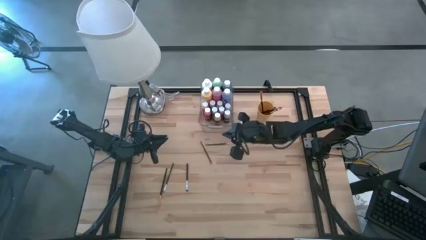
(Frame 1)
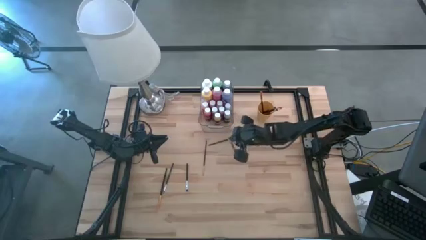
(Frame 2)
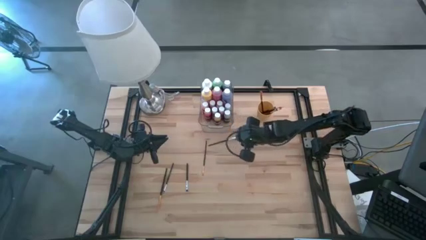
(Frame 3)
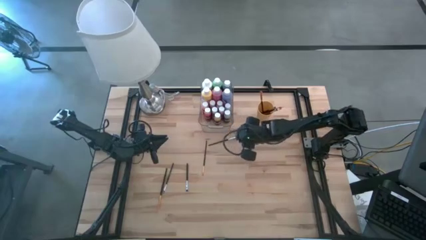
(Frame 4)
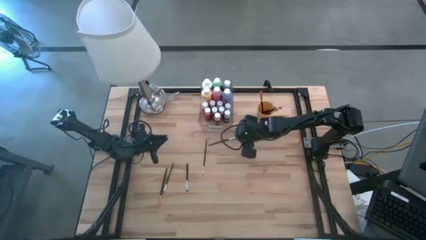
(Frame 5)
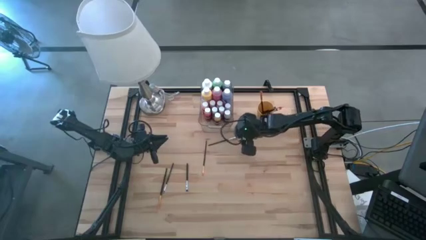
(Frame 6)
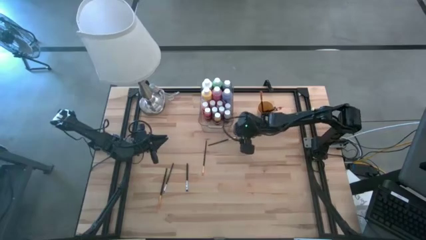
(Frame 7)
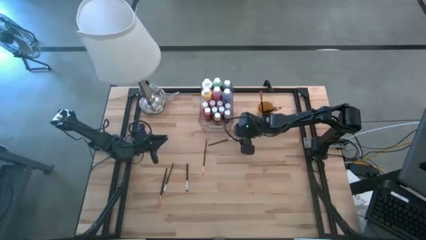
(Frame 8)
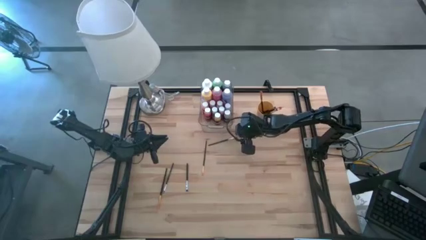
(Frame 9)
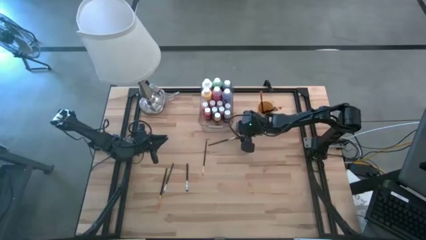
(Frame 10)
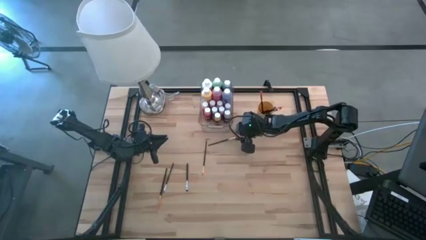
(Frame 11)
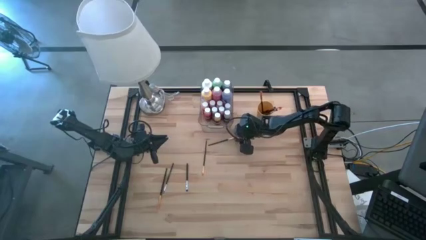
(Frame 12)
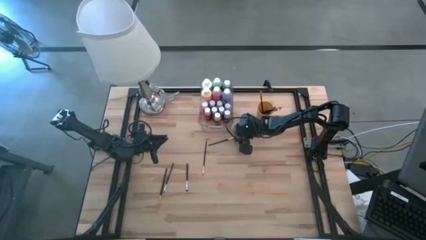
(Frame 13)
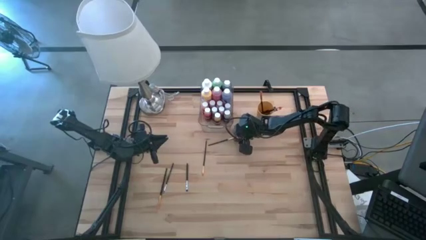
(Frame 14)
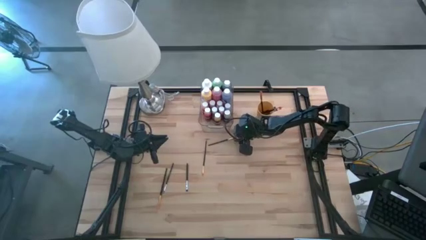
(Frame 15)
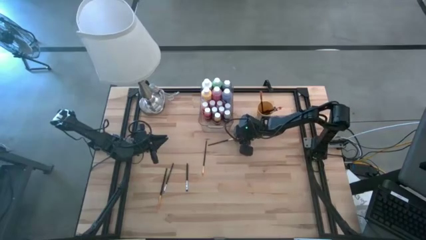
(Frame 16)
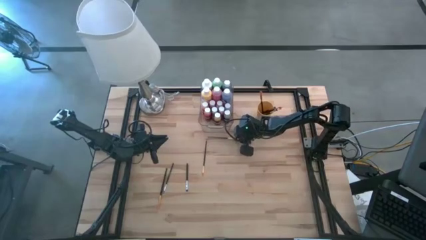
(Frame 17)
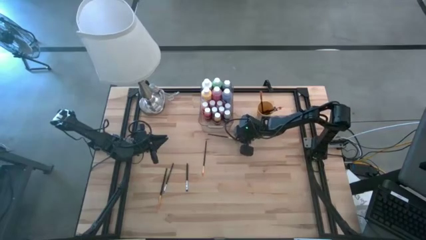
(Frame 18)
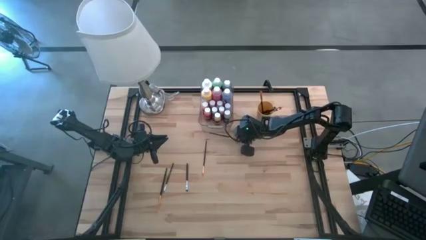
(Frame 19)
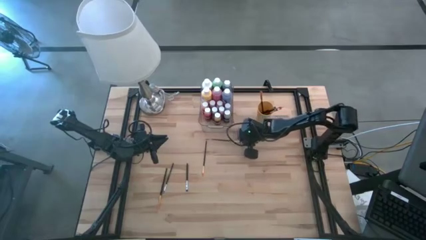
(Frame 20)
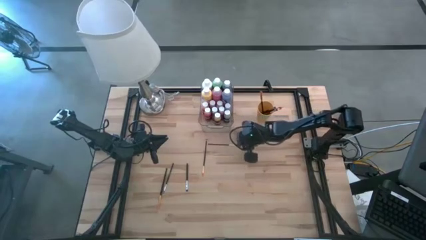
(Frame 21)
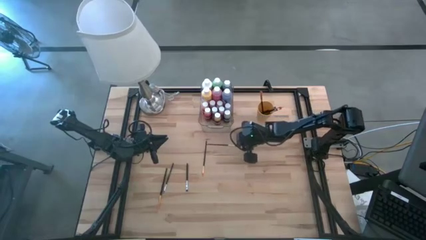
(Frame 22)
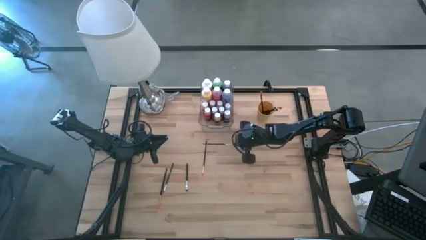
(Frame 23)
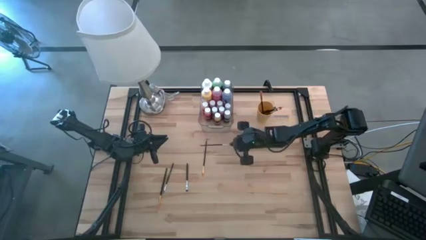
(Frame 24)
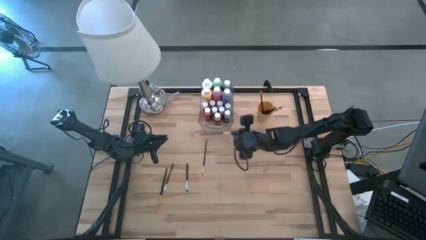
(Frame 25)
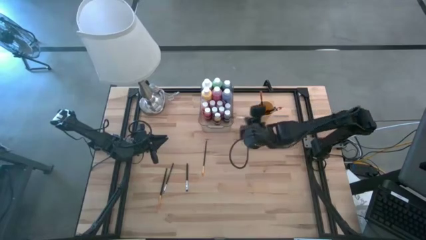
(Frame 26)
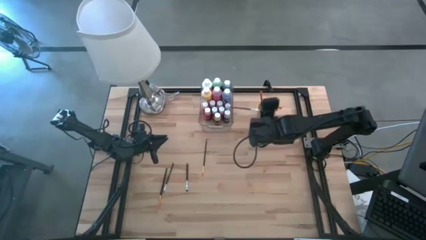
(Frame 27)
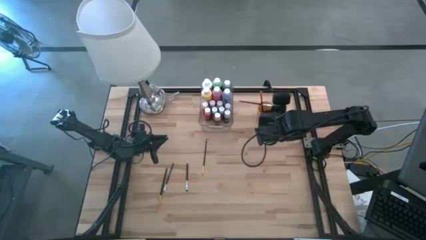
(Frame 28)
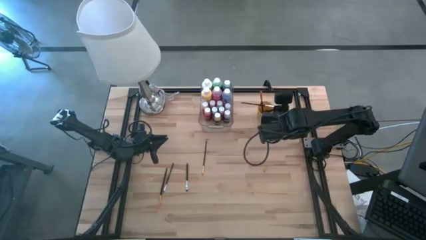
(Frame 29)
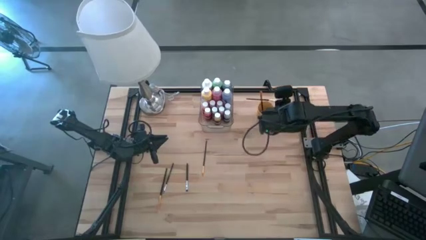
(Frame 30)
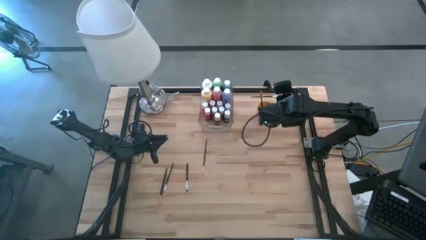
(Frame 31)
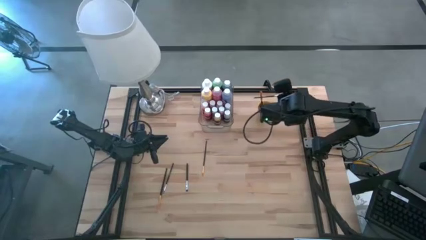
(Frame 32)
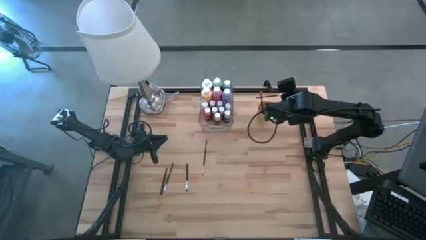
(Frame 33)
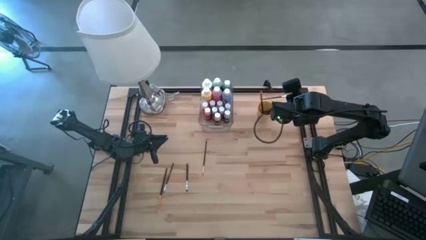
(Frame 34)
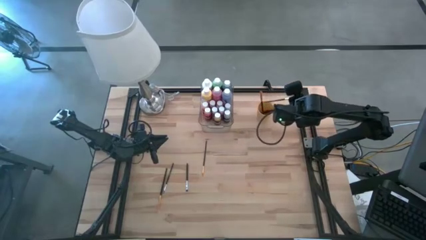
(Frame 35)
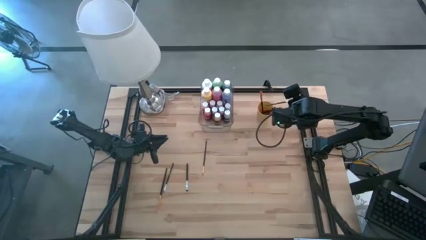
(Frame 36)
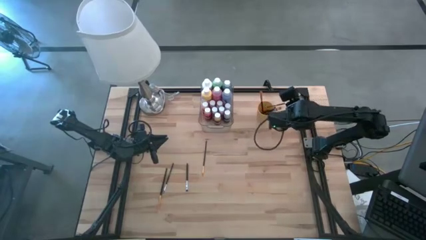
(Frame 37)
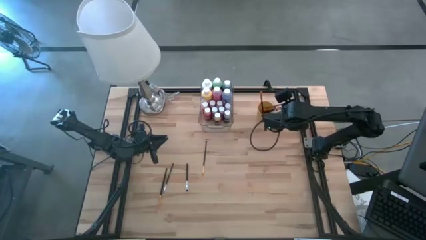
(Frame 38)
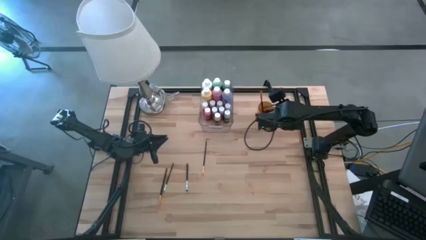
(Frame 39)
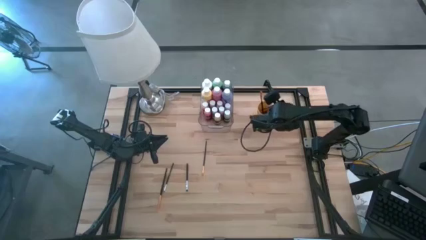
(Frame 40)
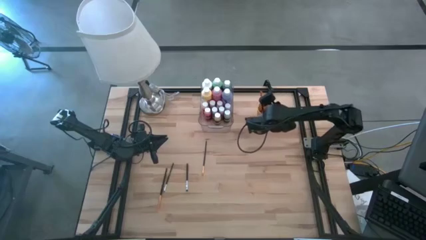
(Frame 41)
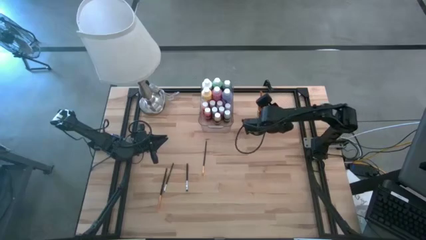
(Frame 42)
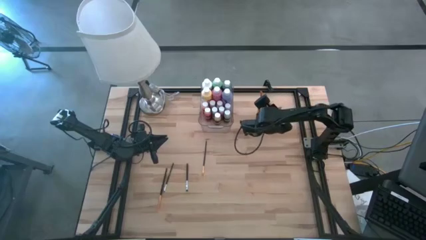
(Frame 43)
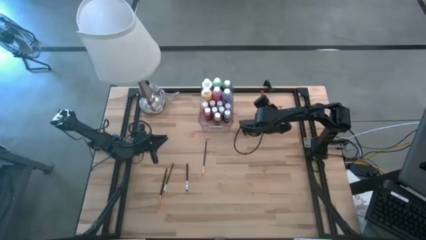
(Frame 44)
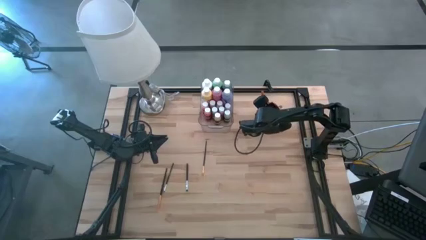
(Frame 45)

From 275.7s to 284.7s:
Task: Pick & Place Paint Supplies
Put the silver paint brush into the cup

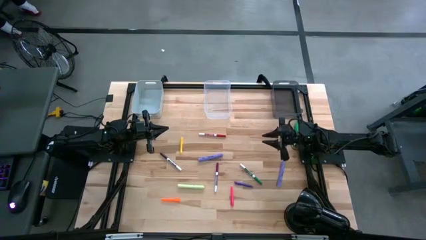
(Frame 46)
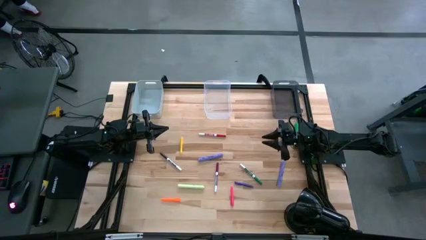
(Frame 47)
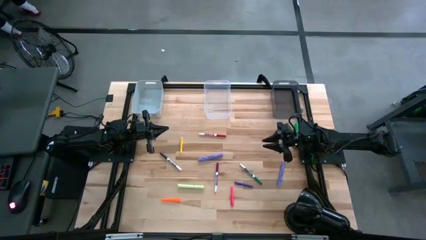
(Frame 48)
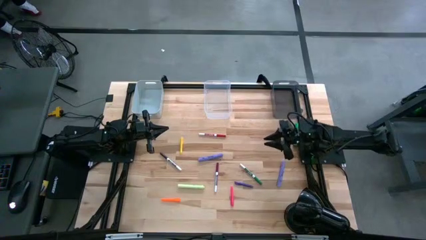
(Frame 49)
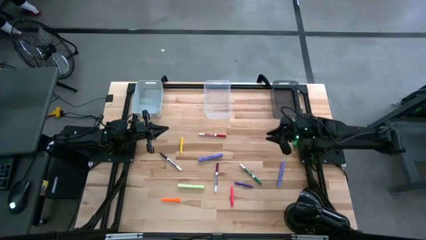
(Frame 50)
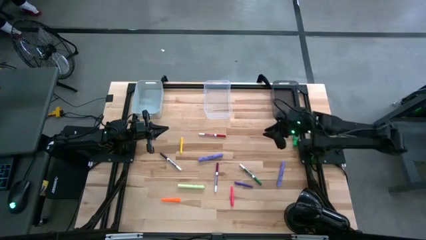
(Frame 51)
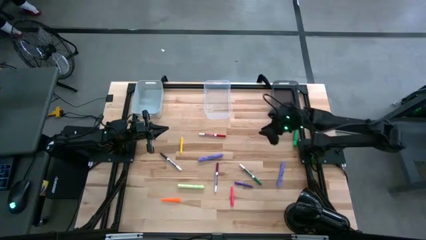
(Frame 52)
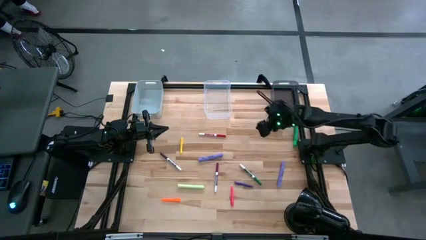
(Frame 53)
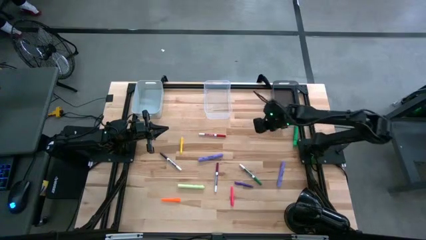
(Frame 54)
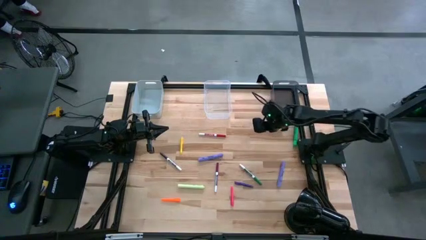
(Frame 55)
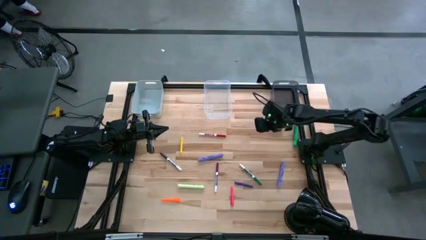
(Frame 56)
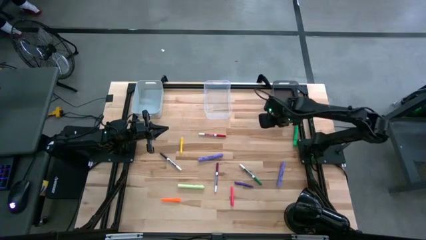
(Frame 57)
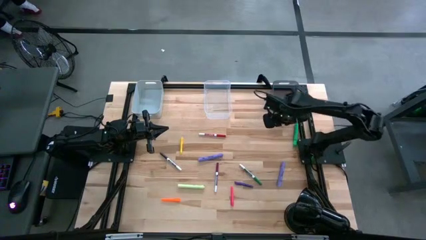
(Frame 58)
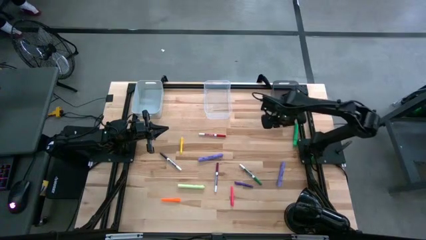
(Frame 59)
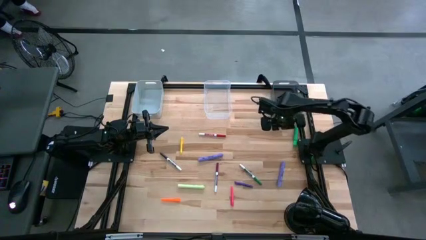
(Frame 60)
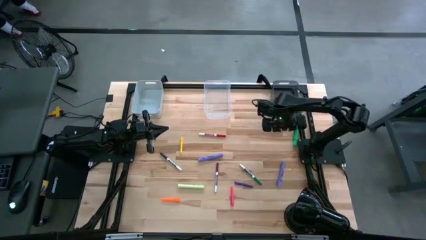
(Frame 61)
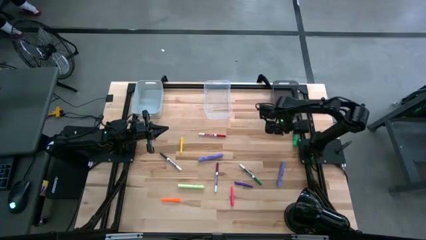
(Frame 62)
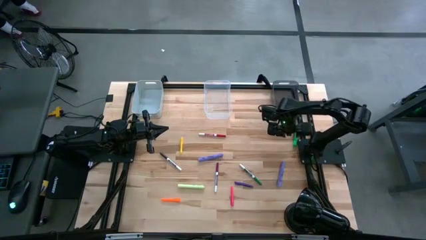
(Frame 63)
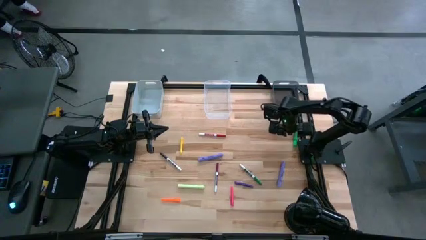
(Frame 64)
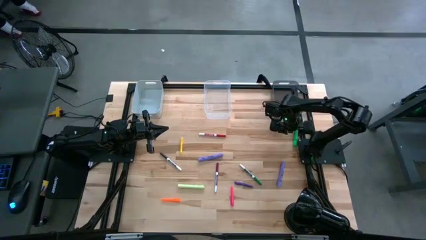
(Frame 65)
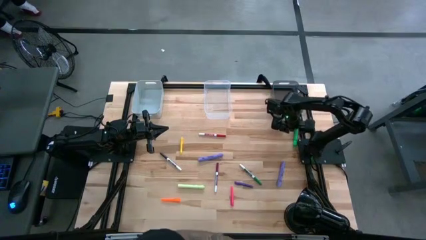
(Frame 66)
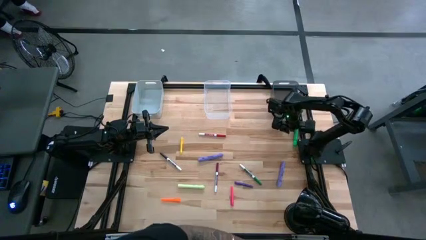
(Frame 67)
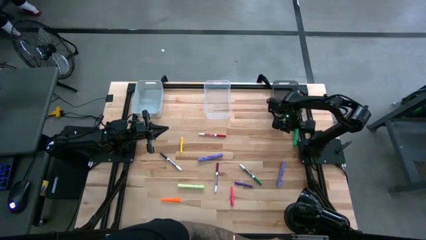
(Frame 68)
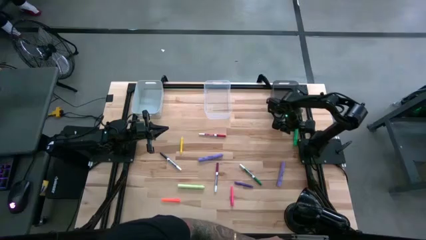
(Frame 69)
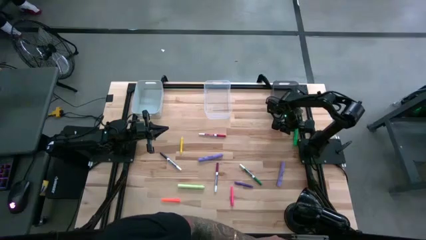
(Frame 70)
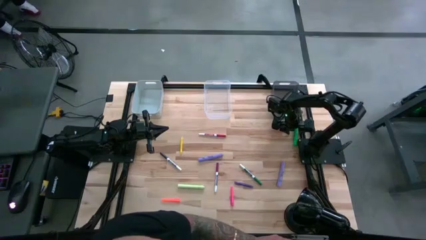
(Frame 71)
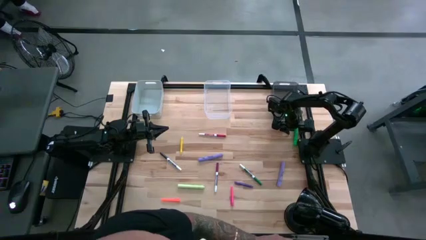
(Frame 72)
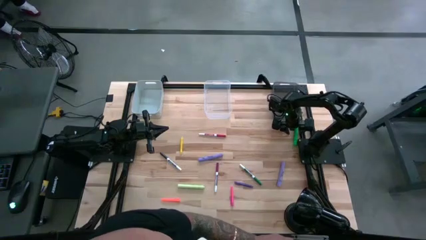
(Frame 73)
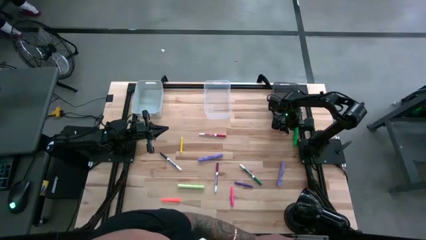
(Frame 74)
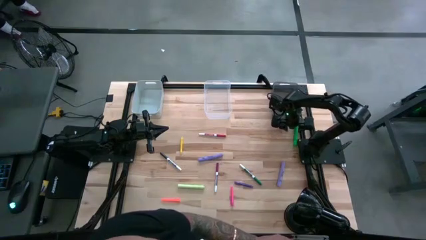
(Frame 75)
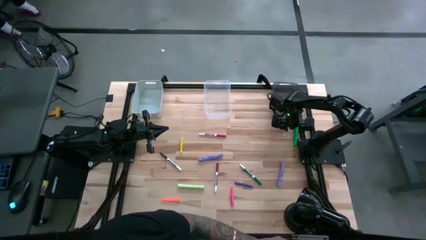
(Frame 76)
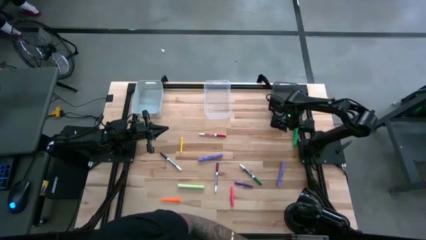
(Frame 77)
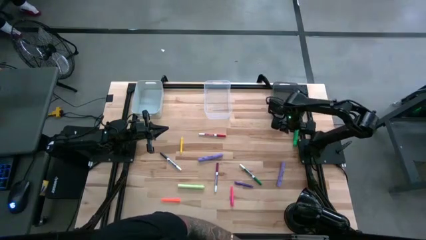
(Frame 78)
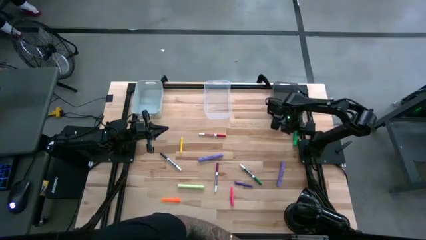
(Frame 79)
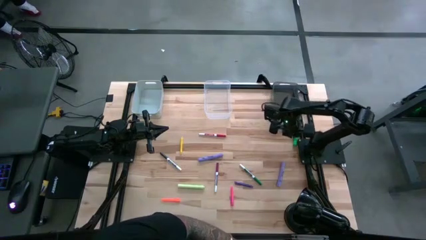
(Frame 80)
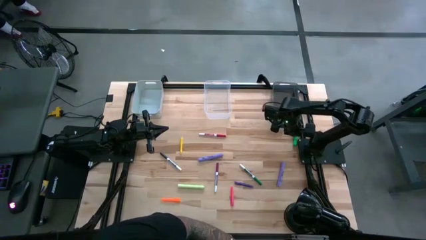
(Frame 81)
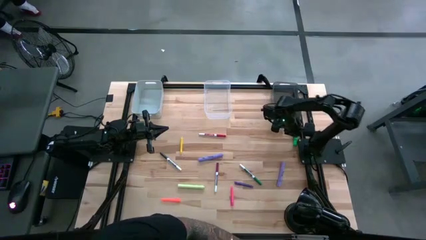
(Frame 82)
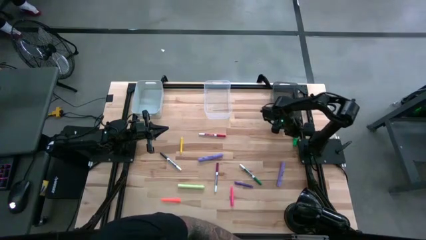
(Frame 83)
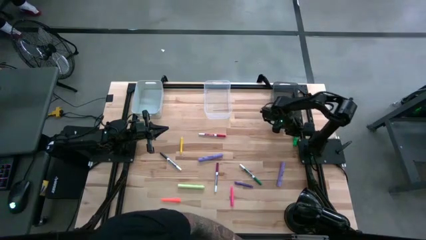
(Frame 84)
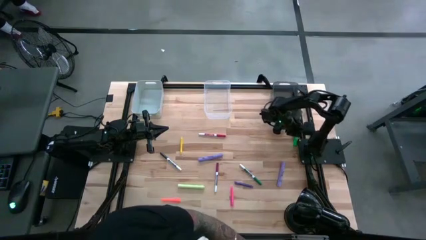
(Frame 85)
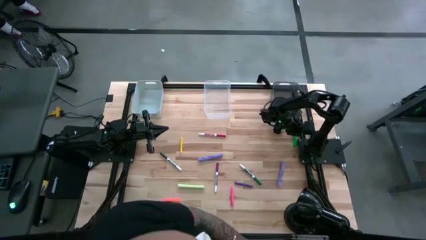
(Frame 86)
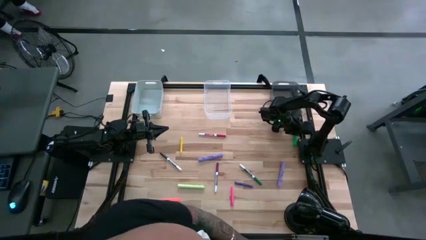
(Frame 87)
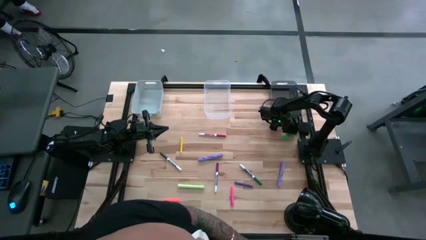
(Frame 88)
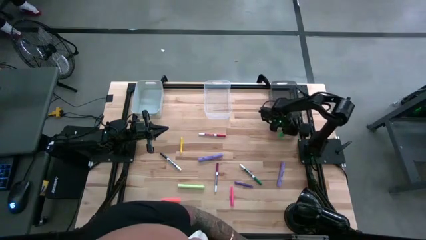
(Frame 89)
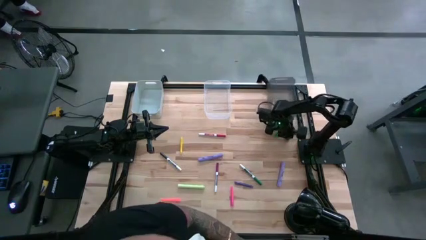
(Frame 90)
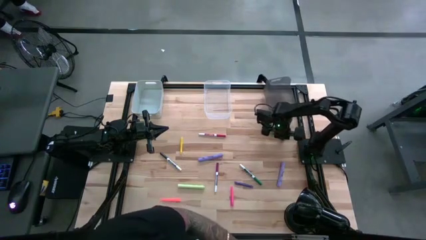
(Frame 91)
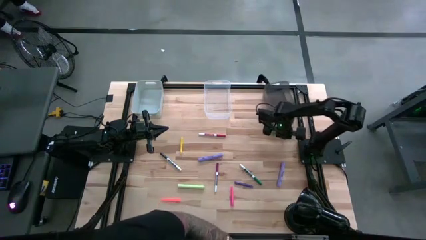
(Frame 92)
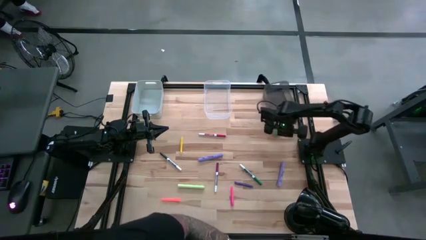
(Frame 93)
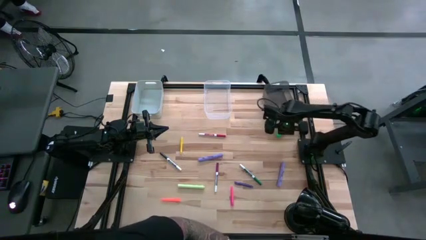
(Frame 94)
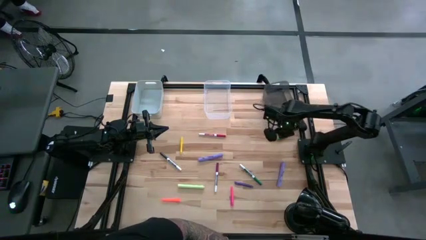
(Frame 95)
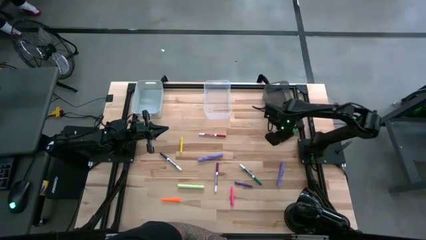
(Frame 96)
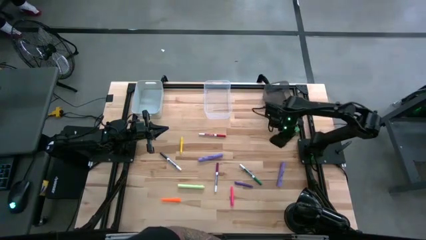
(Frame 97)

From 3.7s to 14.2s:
Task: Pick & Place Markers
Put the green highlighter pen into the black bin
